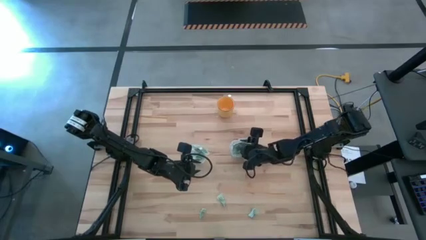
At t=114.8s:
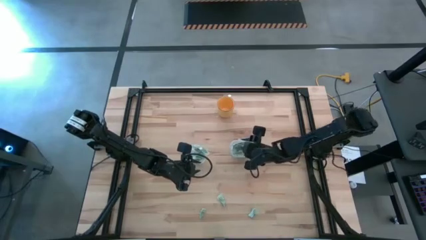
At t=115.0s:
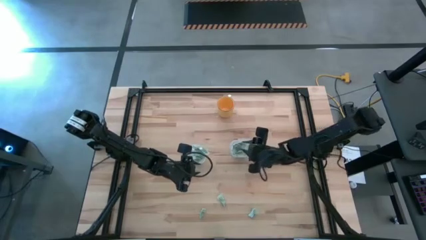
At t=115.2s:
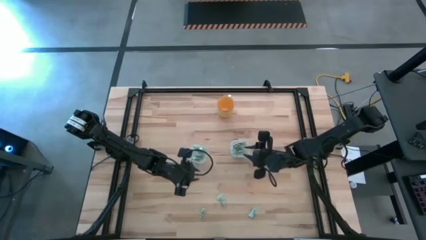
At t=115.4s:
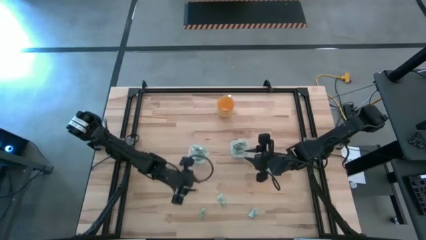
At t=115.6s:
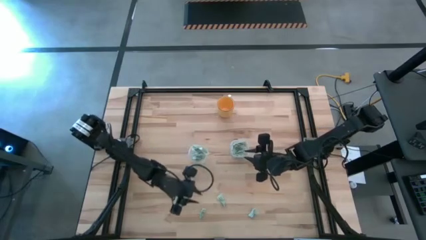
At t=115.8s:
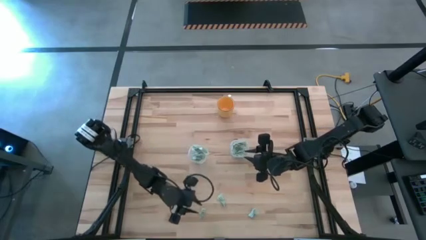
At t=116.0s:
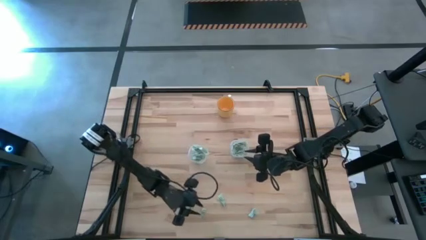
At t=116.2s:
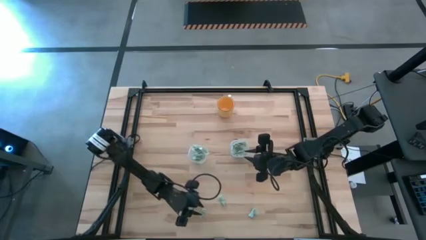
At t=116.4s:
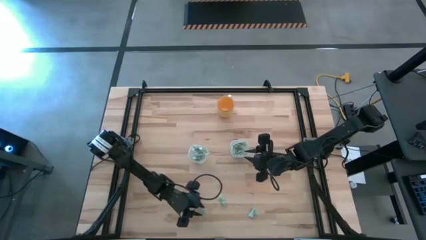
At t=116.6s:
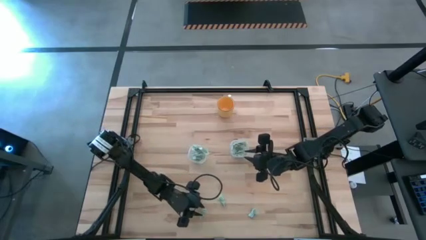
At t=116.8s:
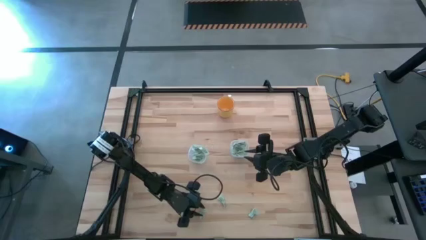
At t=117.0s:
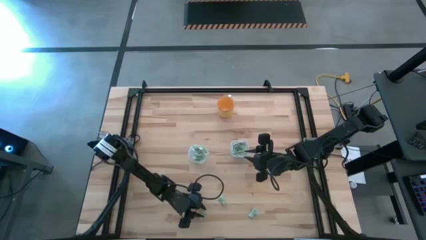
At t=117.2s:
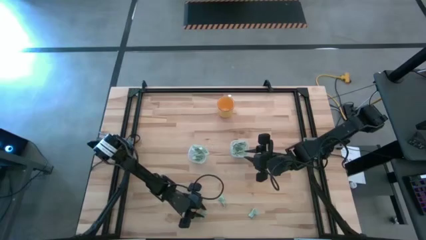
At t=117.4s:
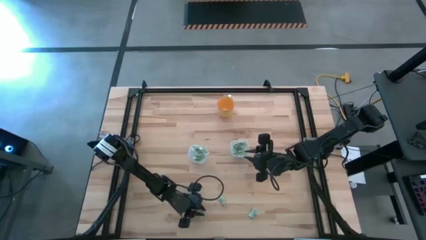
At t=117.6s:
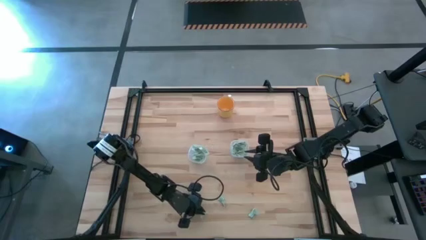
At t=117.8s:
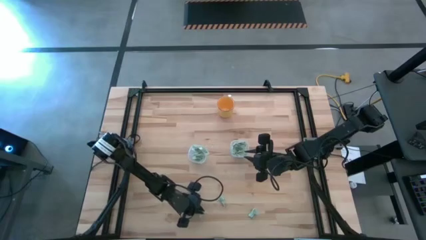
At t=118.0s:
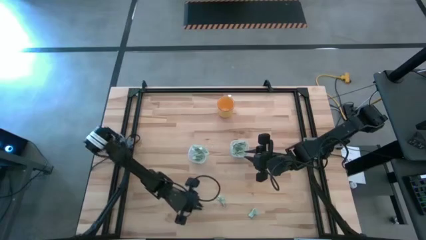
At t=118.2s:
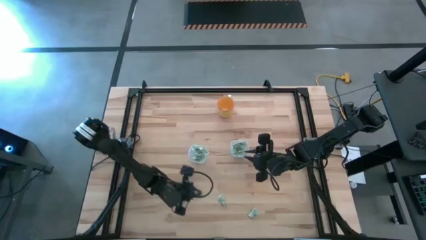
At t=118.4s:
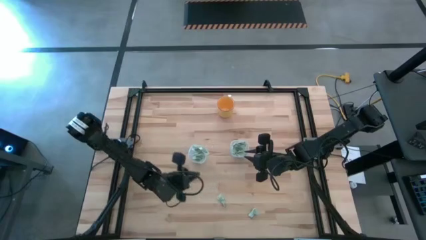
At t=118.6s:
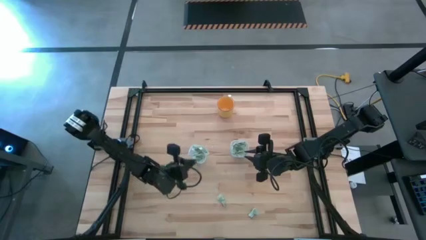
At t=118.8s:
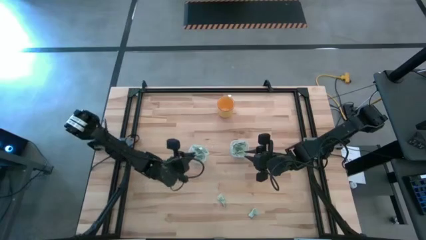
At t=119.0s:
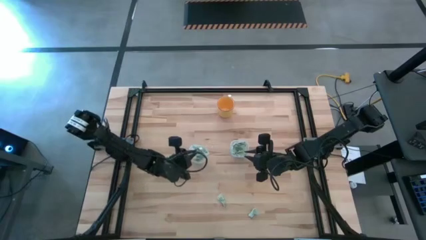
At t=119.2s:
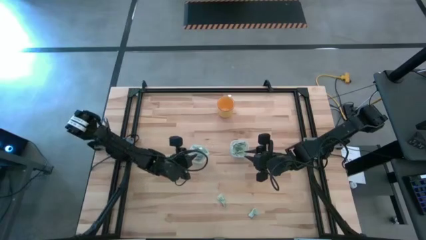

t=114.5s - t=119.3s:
Task: Pick and place items into bin
Put the green sweetener bag into the left transparent food container

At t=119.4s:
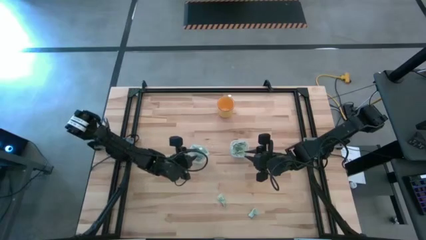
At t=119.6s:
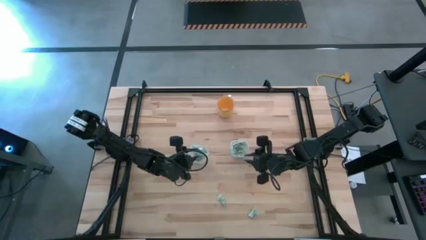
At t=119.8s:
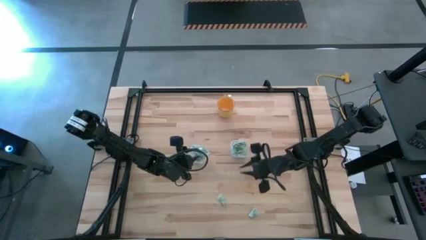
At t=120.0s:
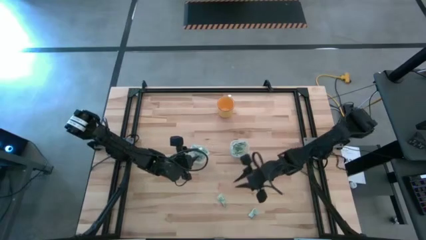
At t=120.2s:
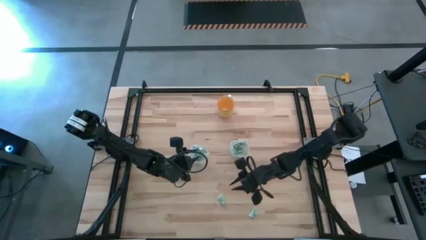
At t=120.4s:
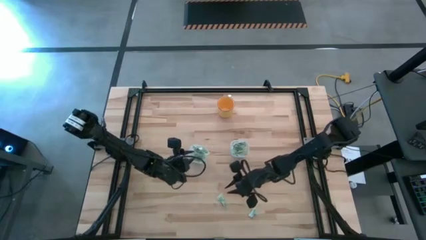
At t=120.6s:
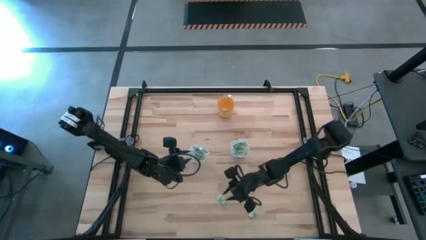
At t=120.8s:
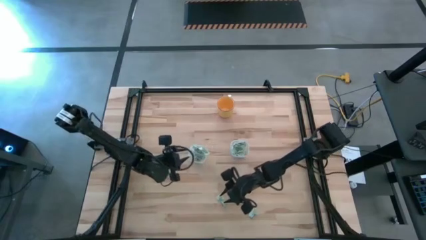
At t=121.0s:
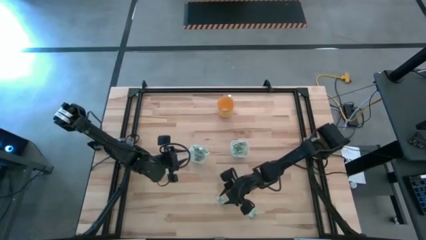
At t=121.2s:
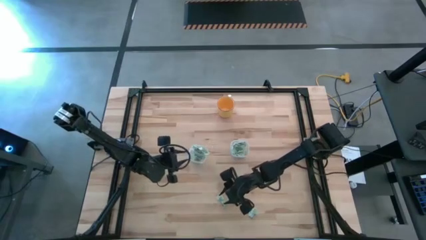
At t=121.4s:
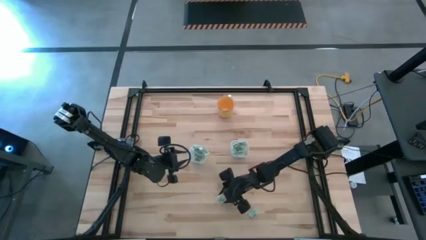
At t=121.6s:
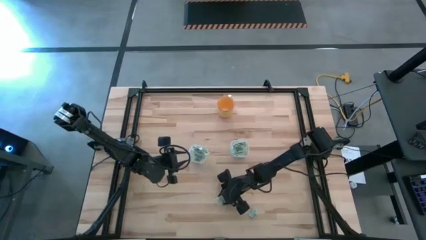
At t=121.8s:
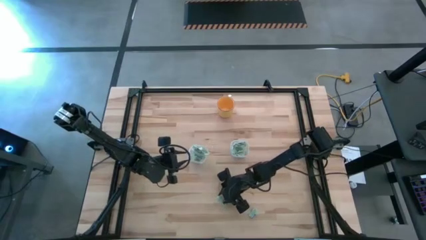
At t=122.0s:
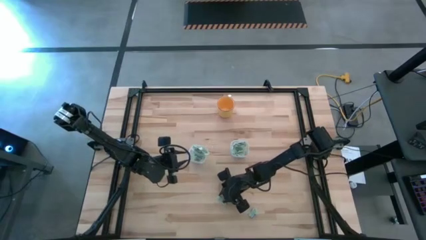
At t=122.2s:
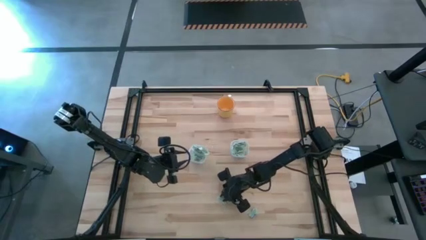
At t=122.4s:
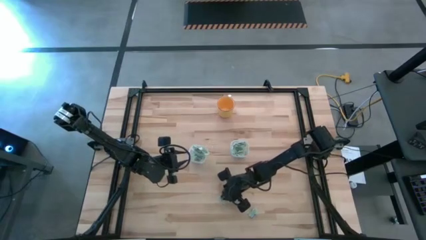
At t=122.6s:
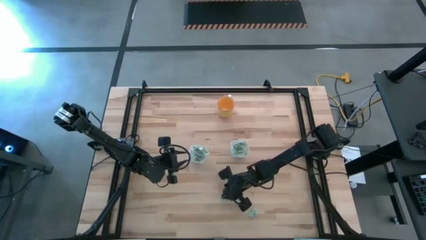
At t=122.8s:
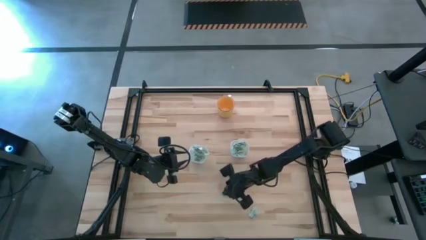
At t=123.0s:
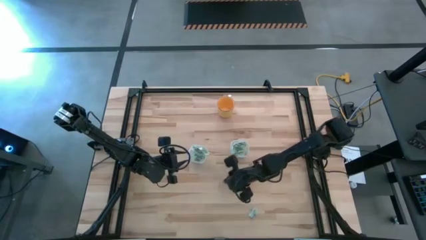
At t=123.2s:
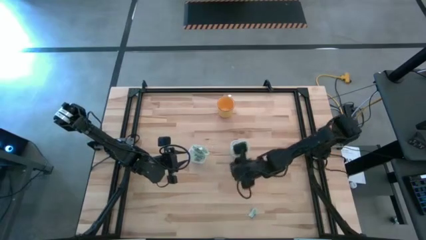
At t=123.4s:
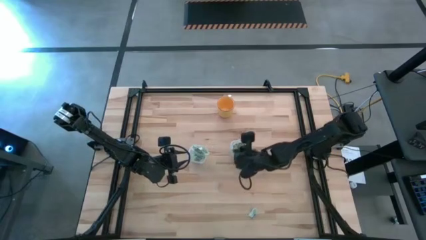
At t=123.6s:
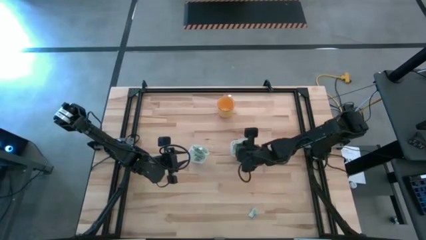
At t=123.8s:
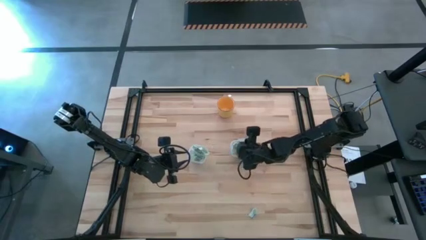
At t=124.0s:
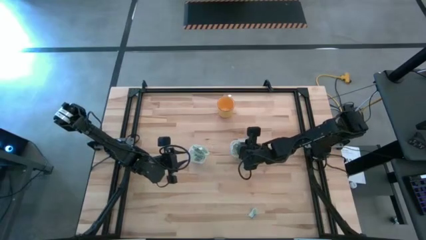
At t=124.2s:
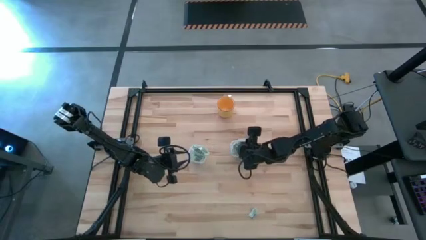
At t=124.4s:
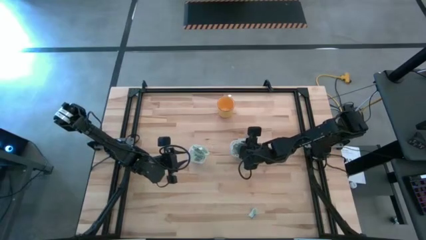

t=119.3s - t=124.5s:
Put the green sweetener bag into the right transparent food container

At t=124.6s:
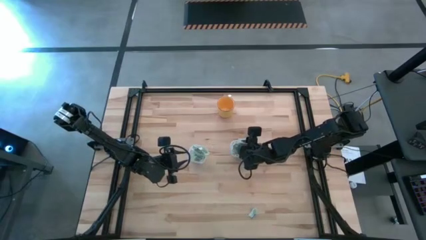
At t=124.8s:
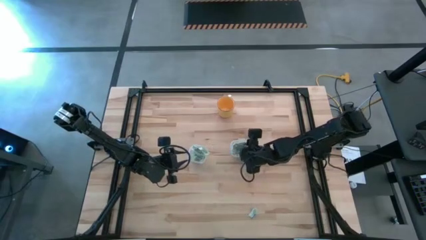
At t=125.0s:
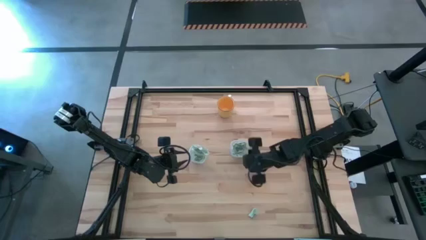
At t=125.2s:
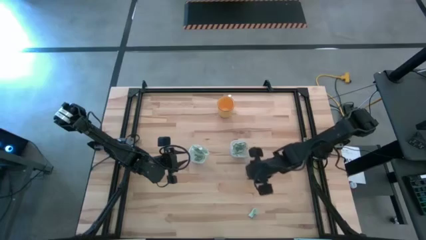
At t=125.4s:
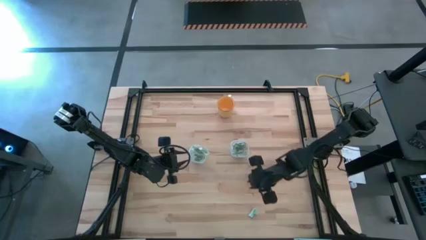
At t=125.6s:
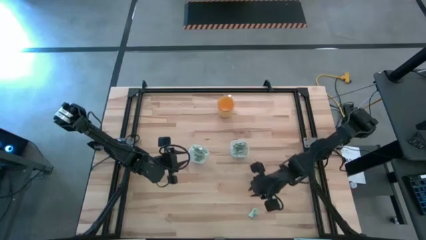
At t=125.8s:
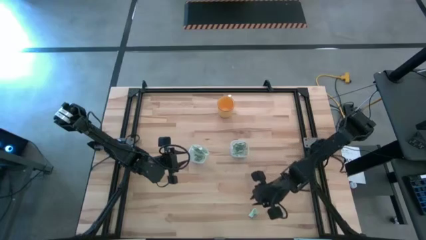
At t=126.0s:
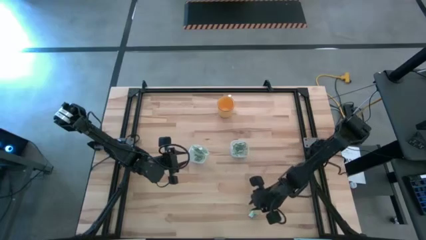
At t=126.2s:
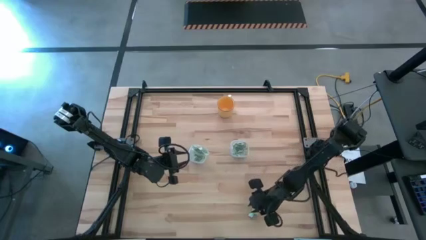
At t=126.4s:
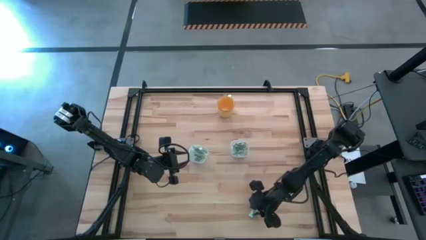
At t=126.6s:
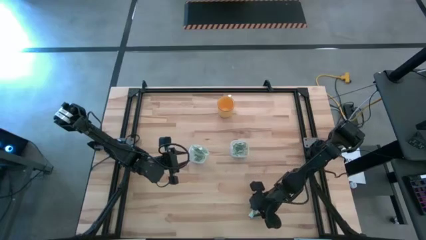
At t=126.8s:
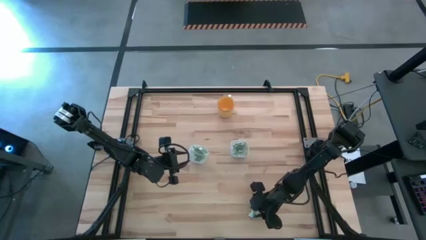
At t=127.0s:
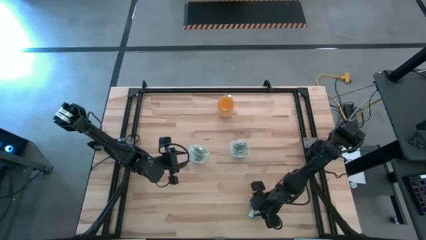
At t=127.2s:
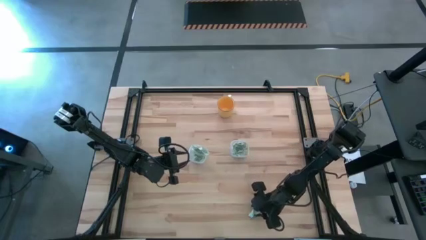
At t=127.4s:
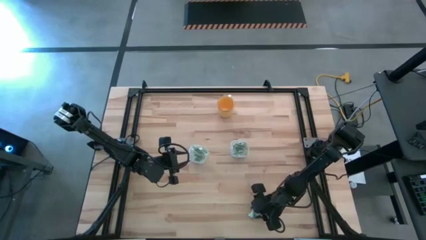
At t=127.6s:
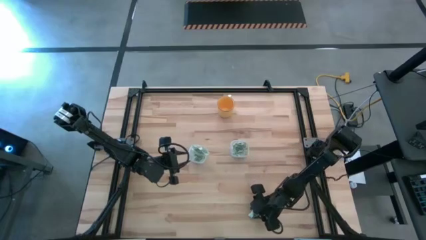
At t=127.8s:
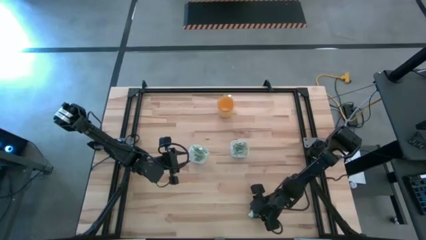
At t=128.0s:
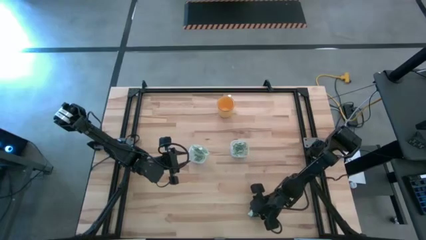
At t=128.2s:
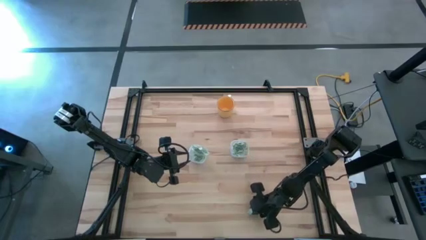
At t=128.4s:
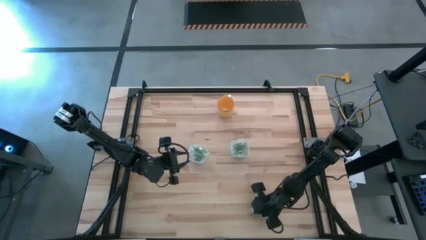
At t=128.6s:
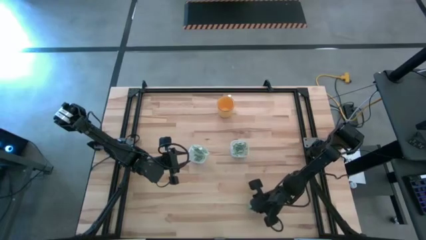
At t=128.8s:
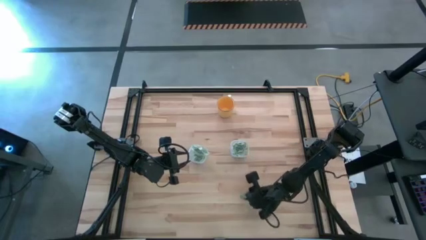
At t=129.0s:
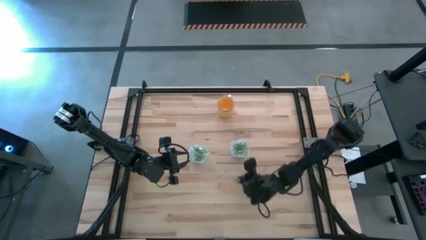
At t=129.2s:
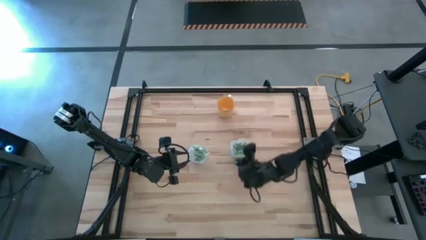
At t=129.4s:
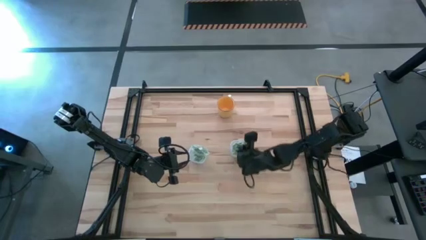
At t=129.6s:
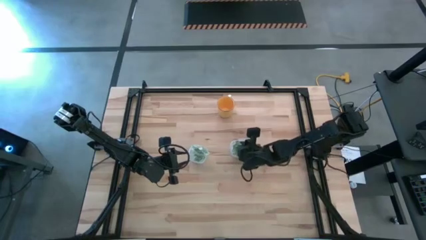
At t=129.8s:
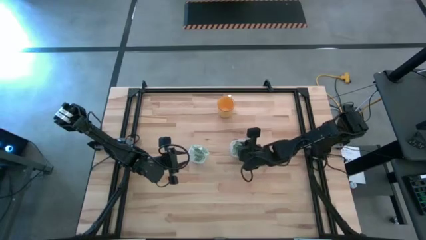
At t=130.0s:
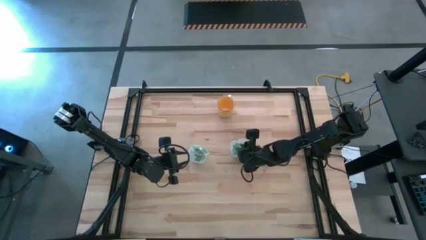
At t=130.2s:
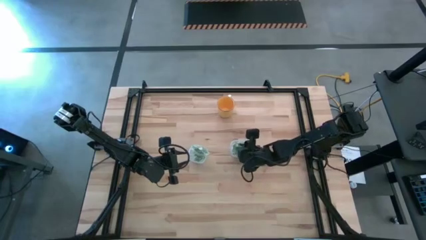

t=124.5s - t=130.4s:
Put the green sweetener bag into the right transparent food container

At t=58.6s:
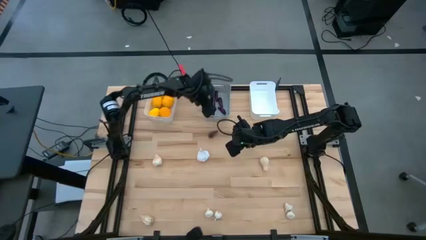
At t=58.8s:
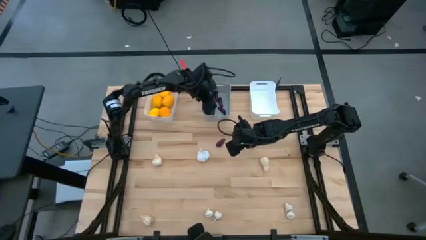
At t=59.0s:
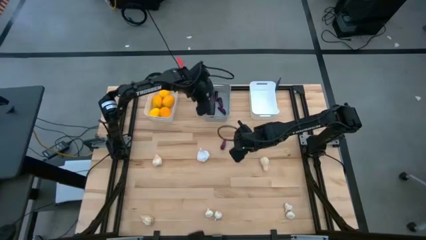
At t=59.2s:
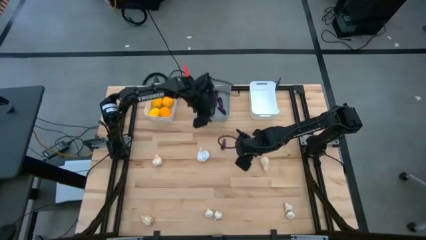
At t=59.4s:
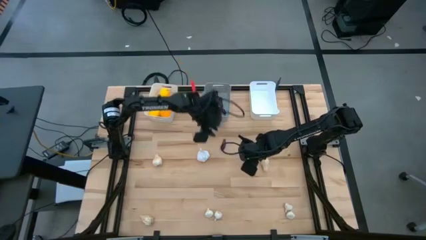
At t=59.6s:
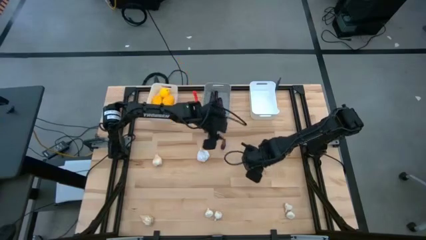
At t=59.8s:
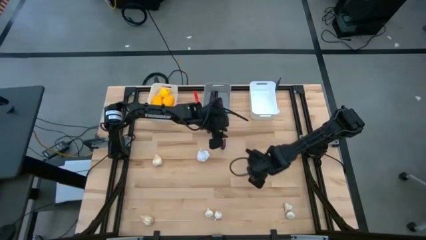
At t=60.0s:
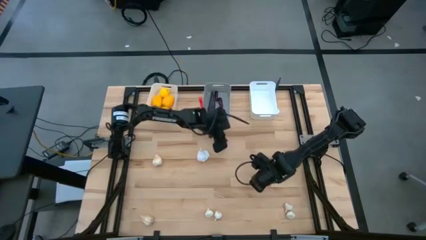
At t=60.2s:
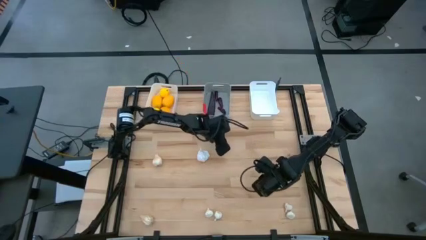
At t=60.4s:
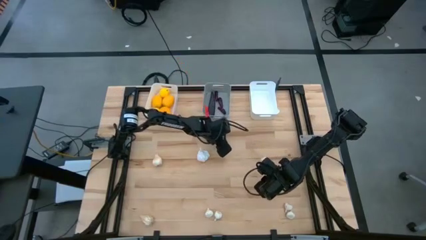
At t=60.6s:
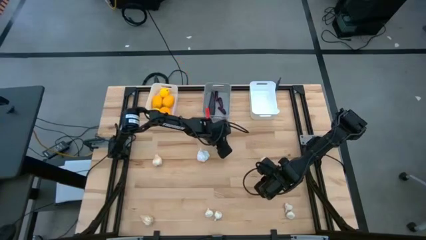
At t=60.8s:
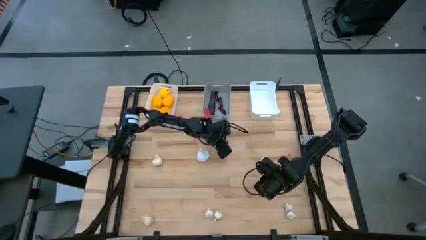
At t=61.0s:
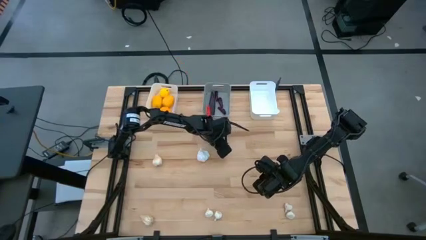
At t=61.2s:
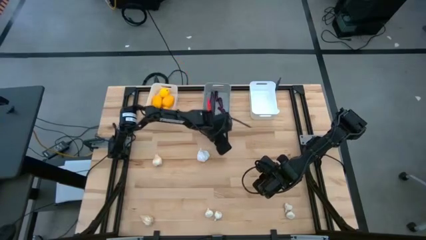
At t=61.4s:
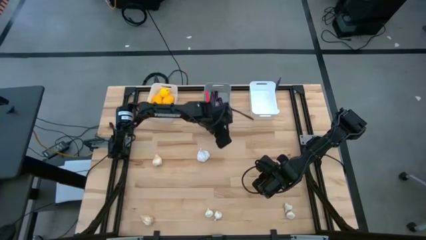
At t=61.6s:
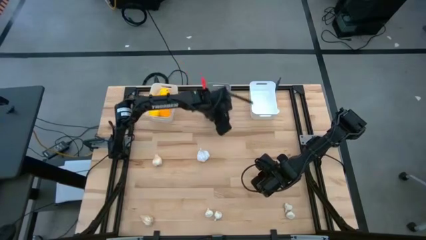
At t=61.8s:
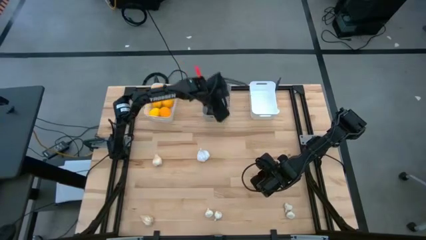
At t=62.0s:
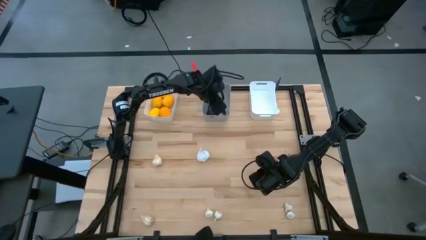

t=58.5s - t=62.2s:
Task: Sort produce into baskets
Put the eggplant into the gray bin
